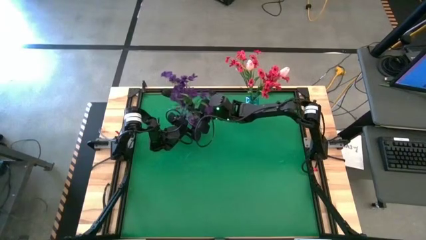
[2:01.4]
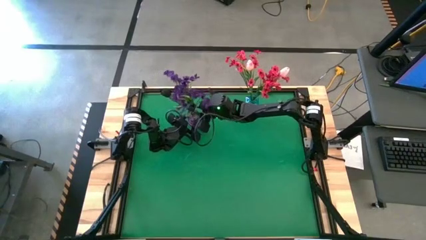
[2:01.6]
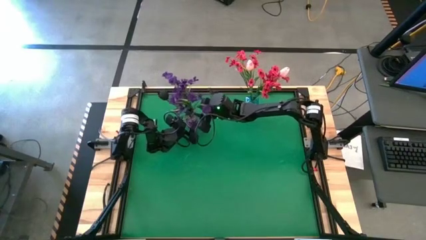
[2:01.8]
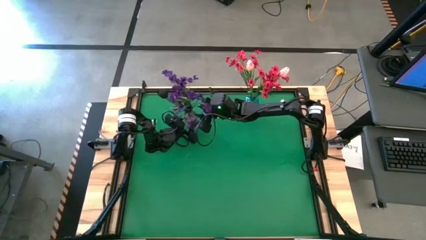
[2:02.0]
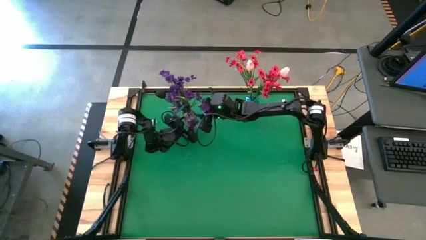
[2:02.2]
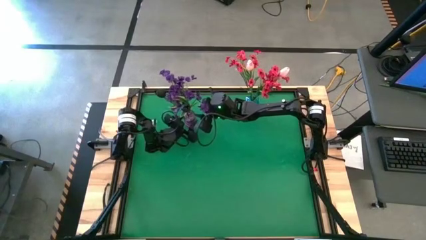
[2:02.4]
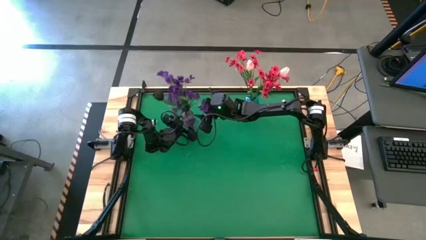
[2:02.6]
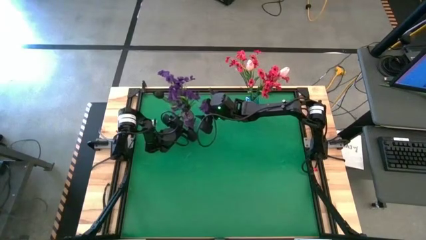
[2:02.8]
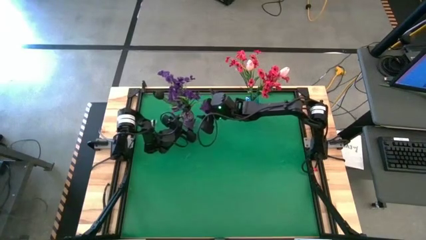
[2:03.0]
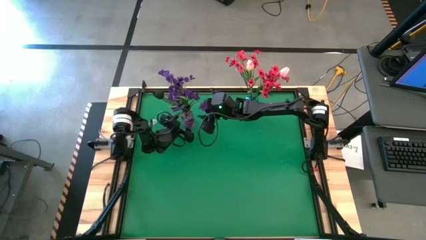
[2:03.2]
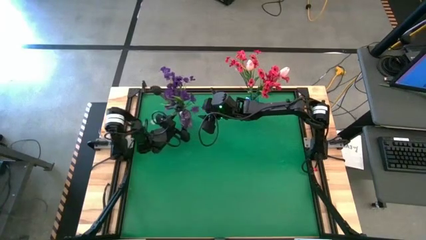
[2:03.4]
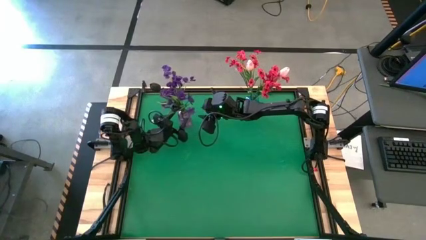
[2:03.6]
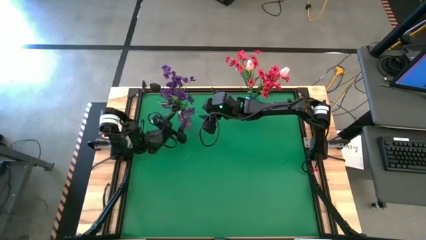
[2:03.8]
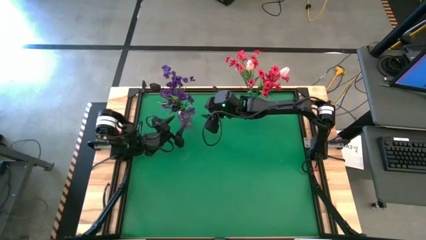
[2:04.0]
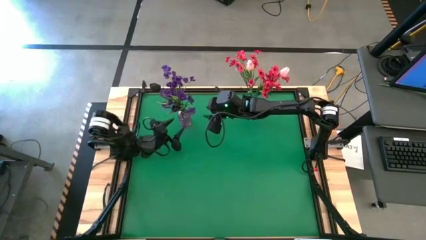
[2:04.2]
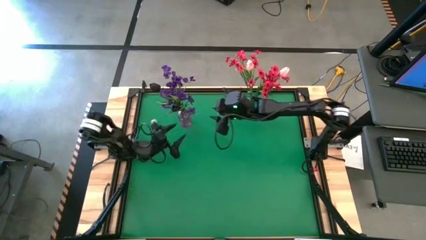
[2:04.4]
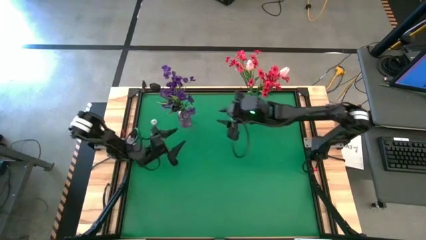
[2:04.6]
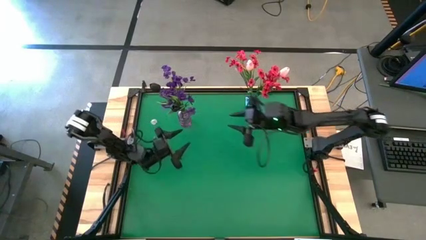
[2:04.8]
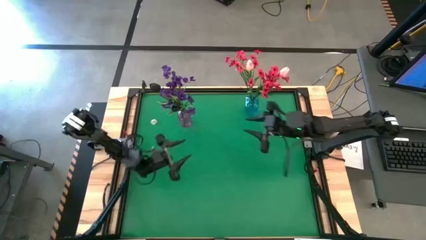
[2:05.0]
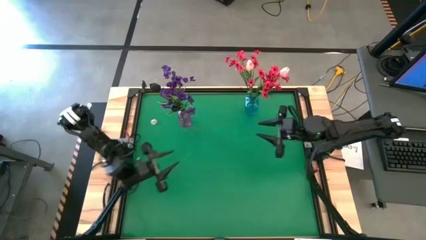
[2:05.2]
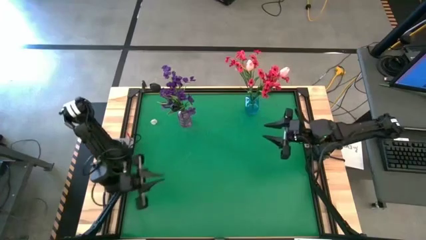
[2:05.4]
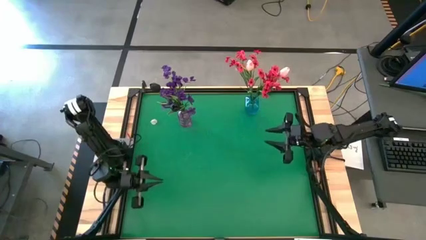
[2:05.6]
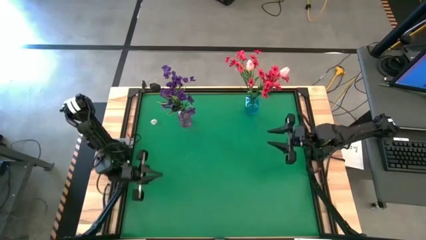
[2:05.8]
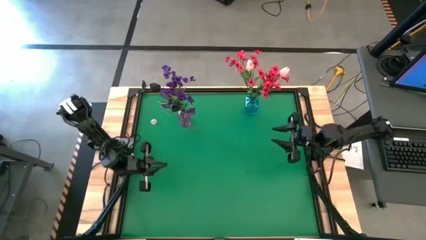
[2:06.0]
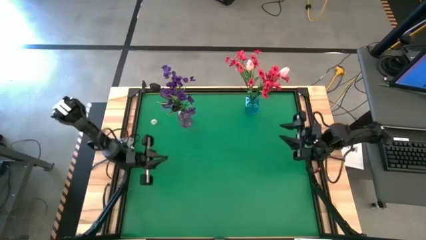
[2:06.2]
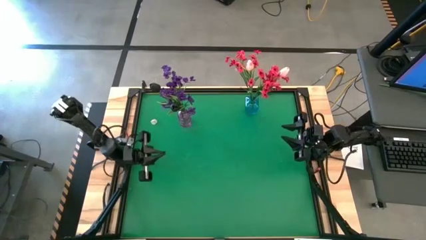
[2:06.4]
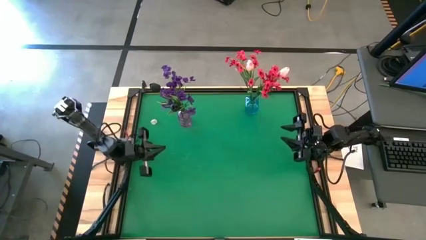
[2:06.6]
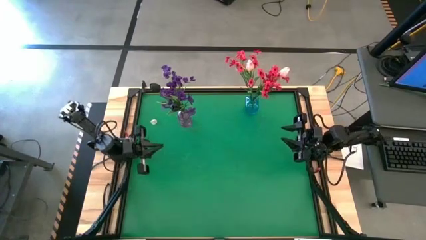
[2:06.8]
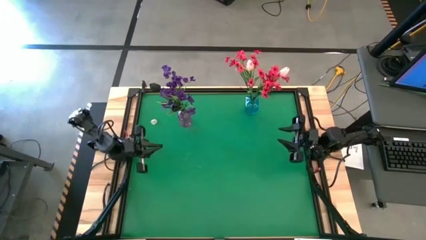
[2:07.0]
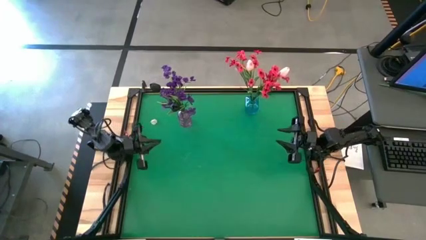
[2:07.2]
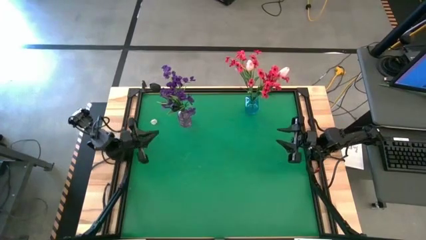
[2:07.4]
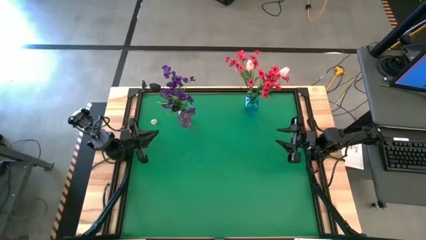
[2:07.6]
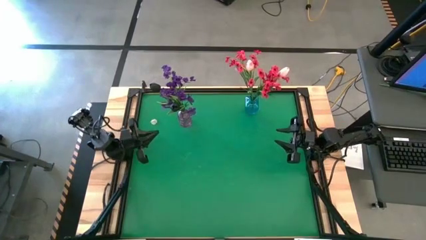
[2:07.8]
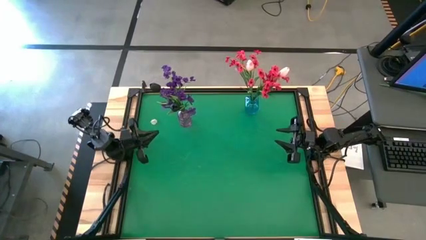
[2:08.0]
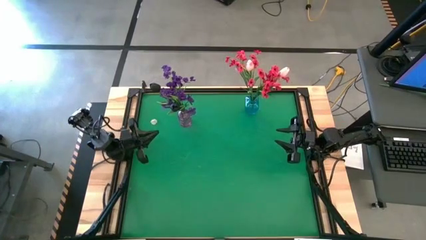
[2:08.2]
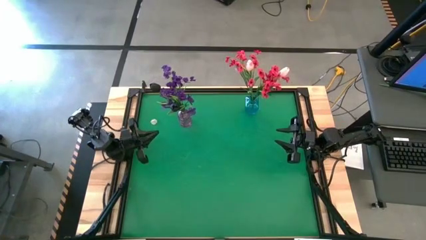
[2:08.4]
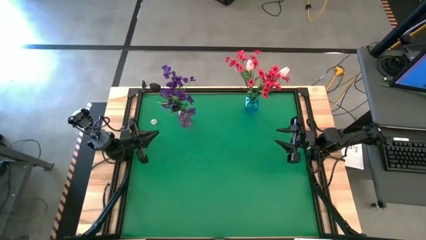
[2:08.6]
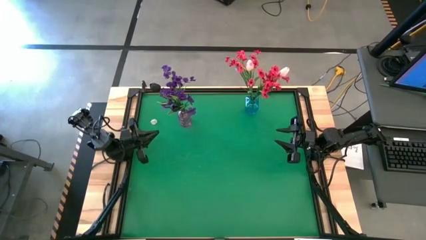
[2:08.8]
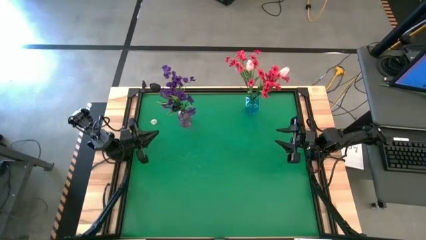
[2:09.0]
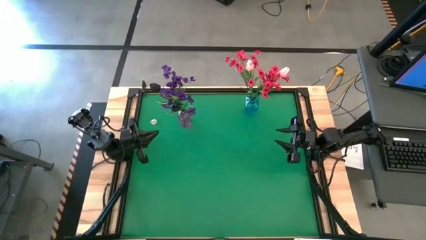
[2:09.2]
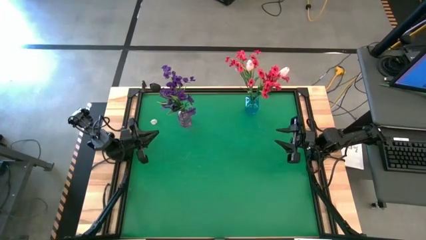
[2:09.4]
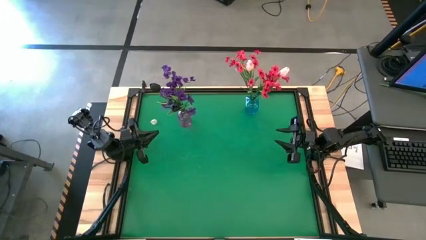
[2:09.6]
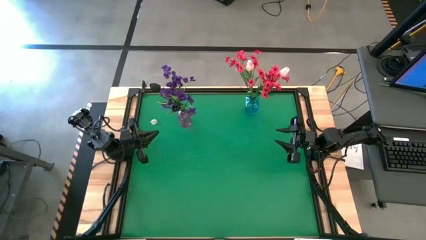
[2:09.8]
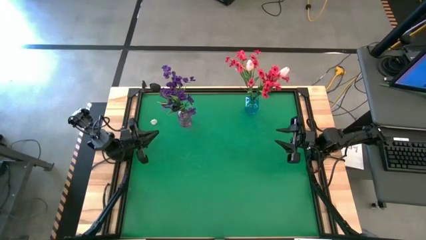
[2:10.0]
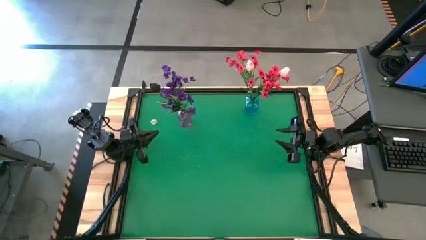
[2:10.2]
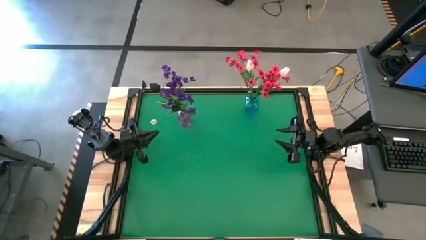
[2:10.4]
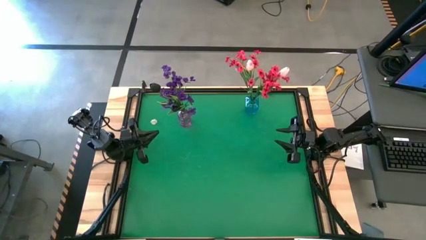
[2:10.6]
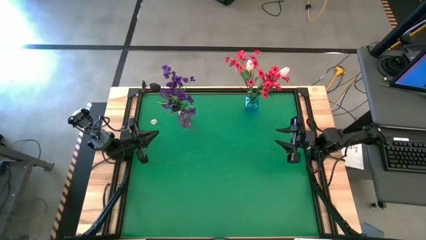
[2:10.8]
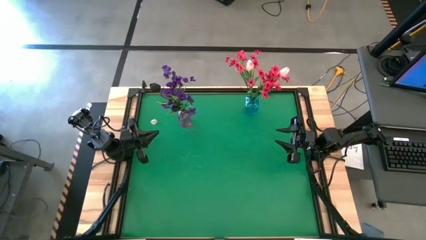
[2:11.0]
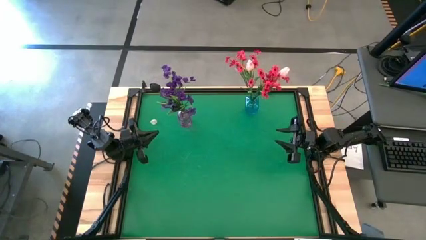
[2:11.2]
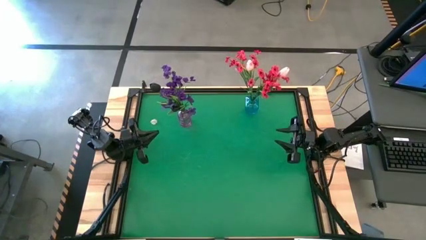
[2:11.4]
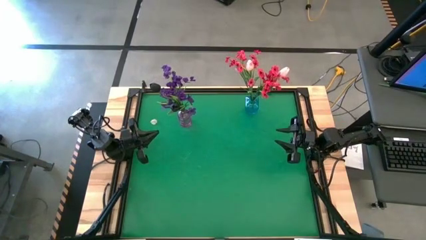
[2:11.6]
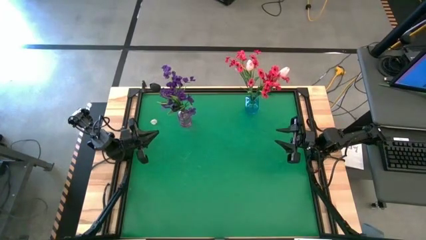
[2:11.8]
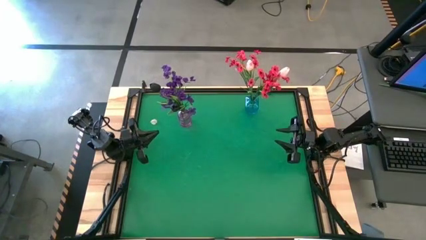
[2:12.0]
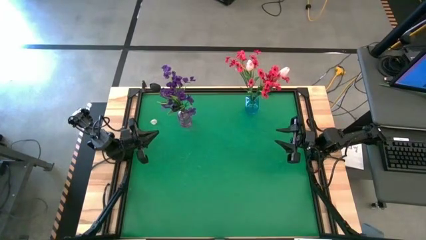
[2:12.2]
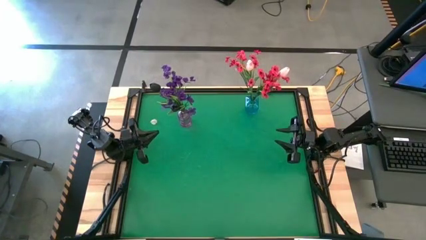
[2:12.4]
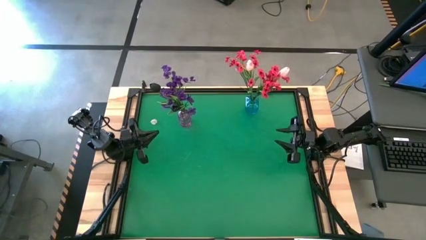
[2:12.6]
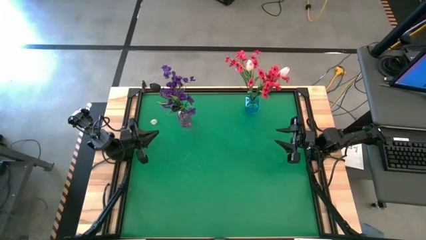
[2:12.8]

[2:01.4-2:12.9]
Task: Sort flowers into vase by color
Return to Home Position

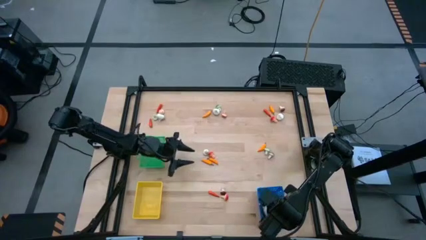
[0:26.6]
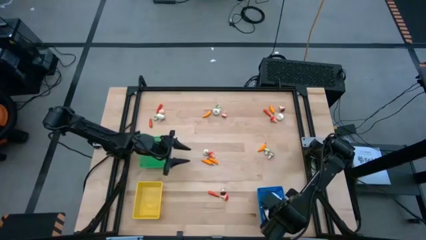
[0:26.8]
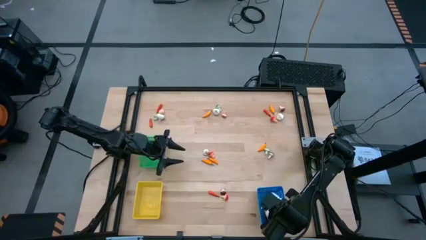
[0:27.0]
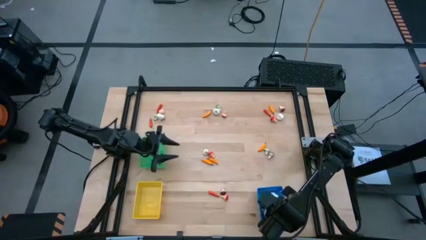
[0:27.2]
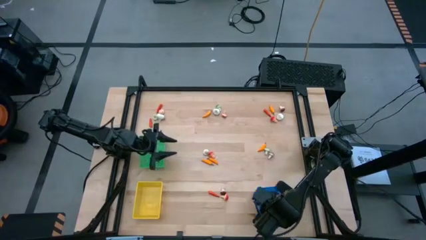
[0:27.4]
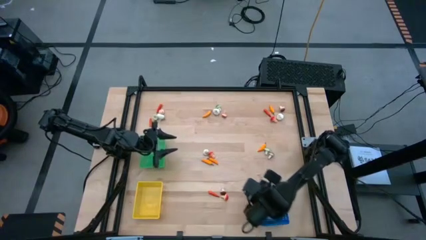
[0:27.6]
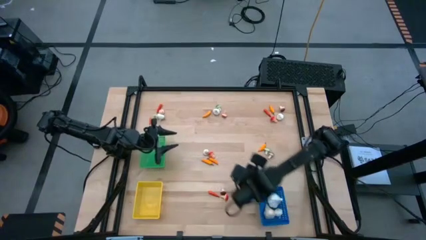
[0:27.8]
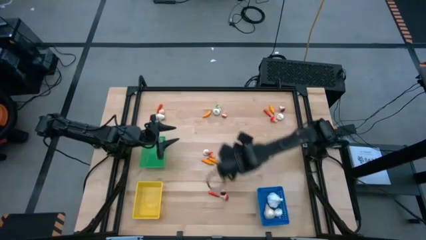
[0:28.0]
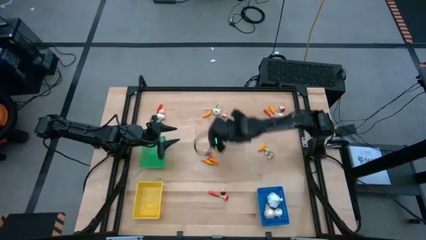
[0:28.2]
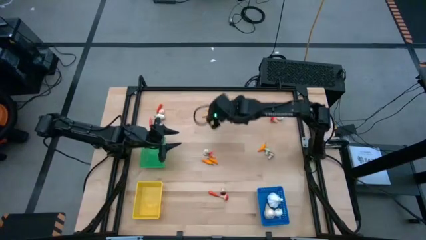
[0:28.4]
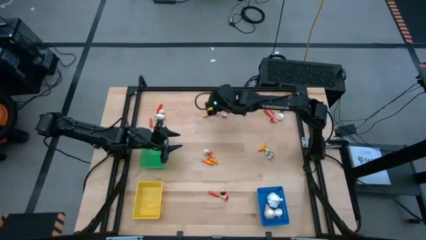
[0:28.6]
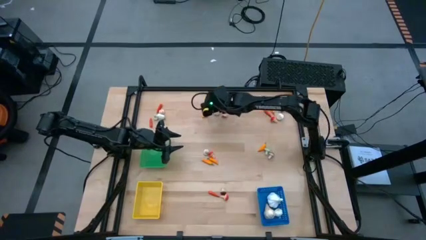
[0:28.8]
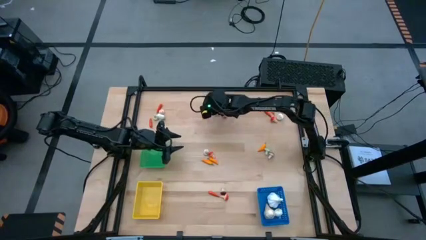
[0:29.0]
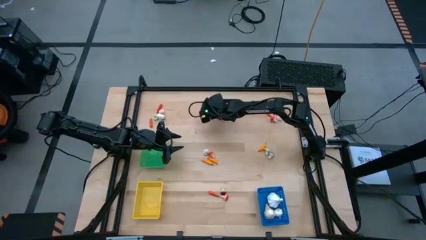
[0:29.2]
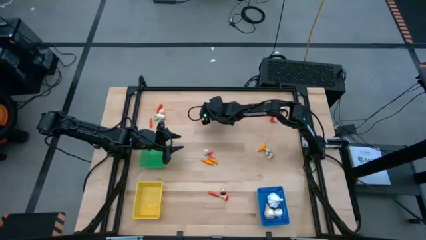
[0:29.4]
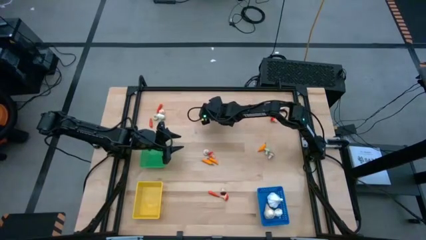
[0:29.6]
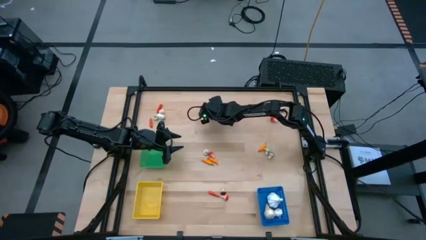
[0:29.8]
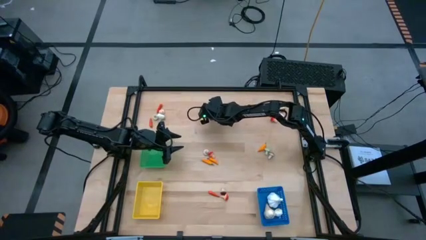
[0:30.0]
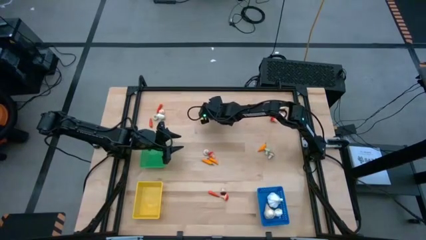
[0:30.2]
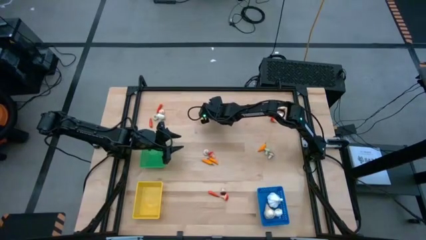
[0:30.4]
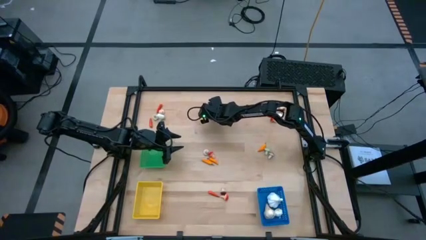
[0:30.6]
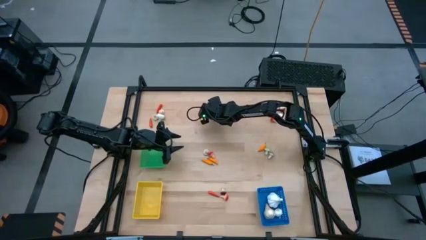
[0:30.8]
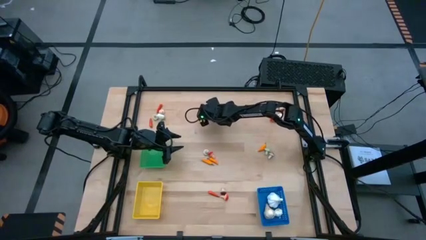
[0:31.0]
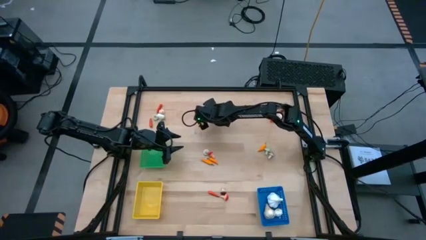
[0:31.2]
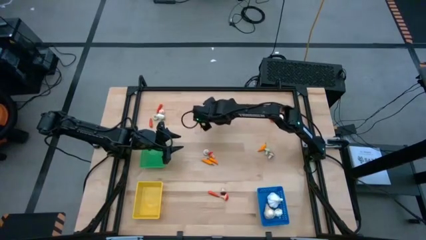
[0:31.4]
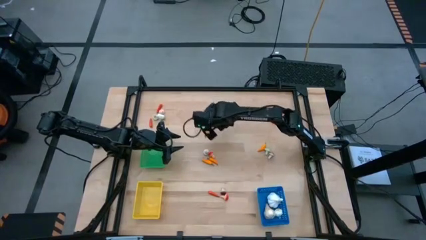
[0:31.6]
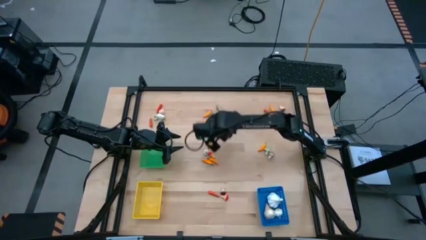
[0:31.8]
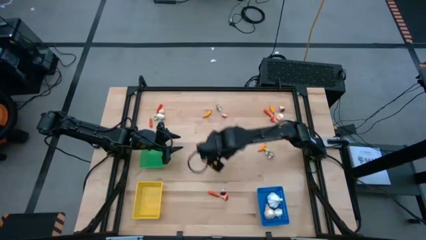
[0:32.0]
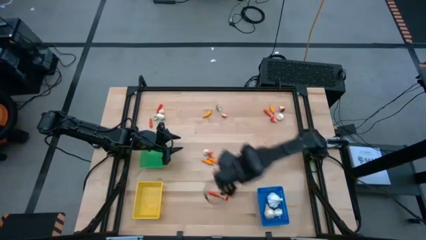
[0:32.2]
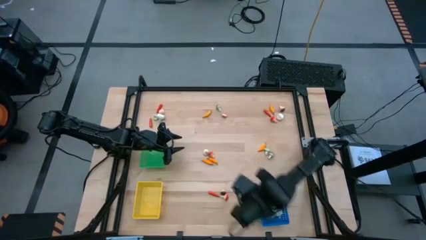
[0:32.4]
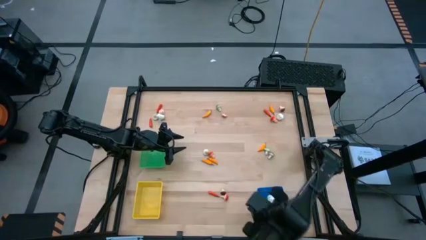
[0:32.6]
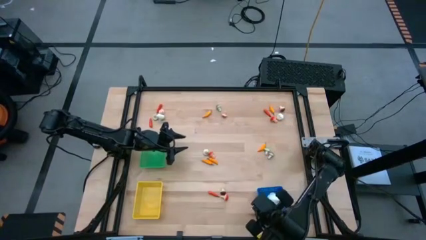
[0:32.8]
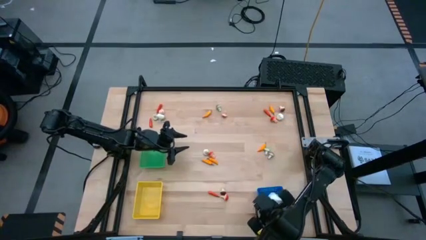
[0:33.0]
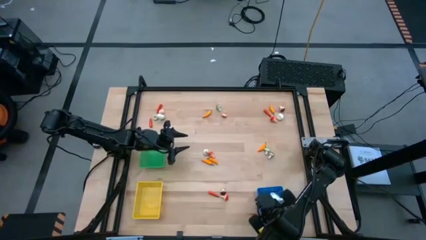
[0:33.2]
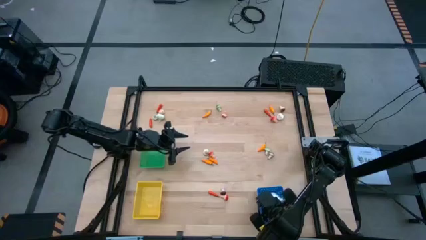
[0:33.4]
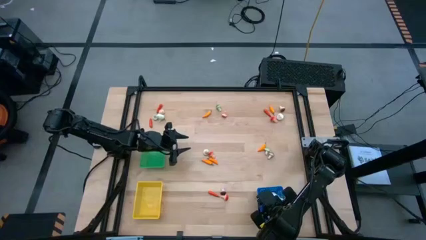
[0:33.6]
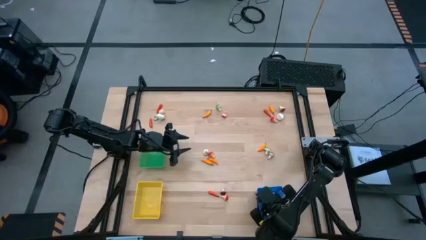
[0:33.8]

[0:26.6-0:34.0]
Task: Sort produce into baskets
Put the garlic into the blue bin
